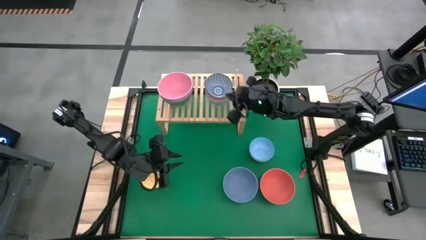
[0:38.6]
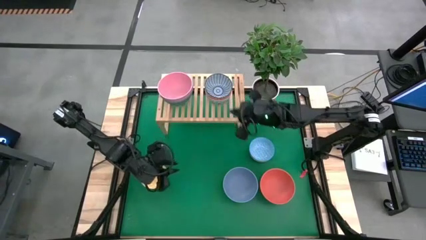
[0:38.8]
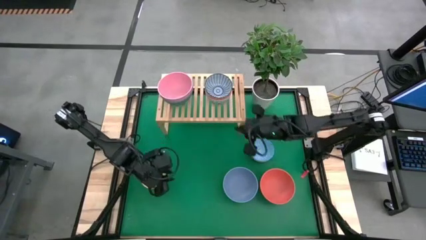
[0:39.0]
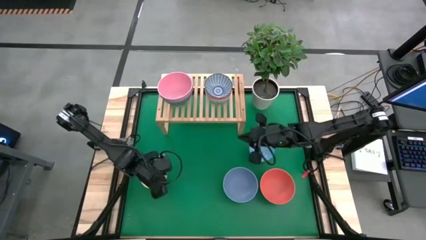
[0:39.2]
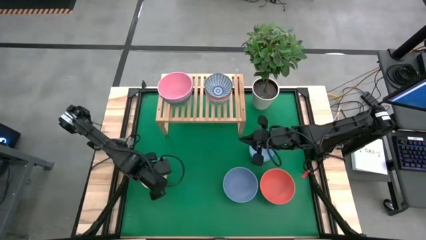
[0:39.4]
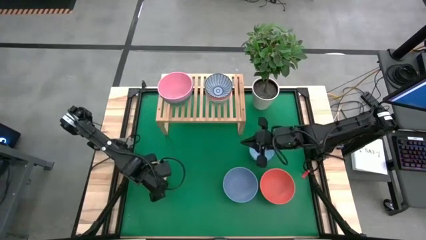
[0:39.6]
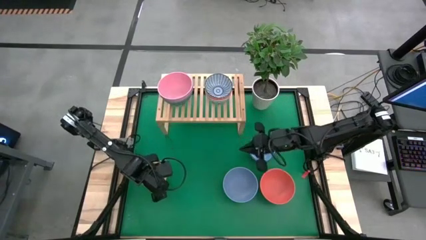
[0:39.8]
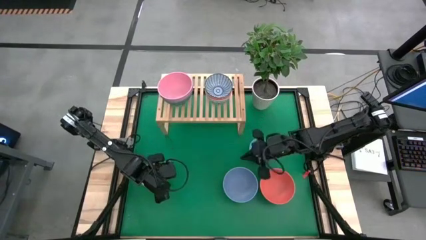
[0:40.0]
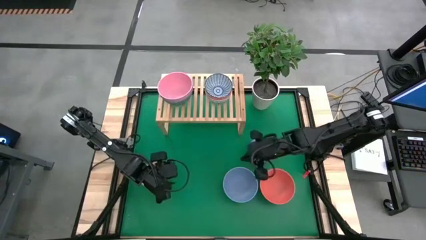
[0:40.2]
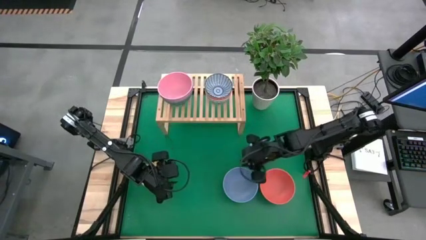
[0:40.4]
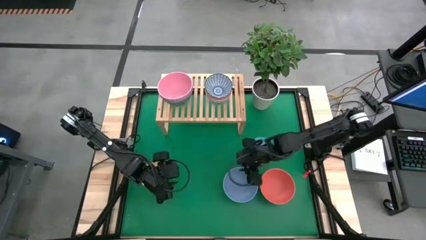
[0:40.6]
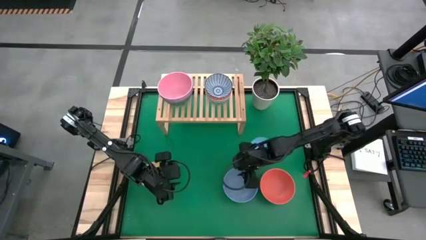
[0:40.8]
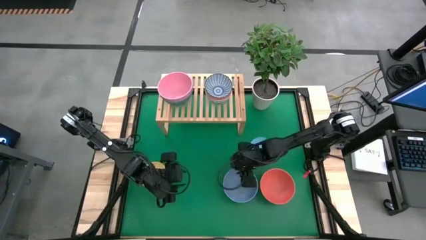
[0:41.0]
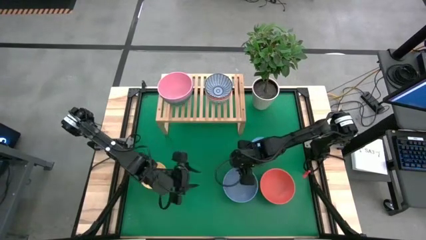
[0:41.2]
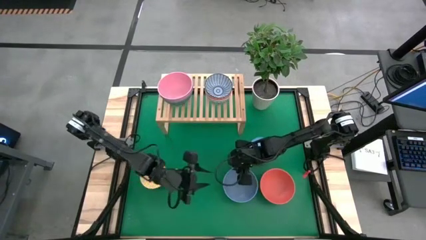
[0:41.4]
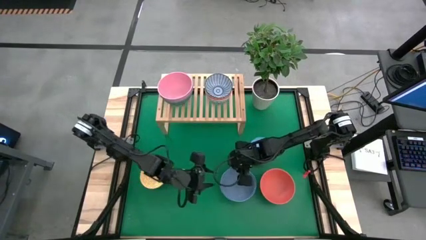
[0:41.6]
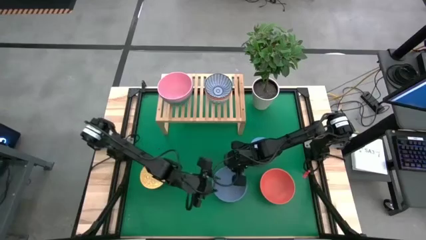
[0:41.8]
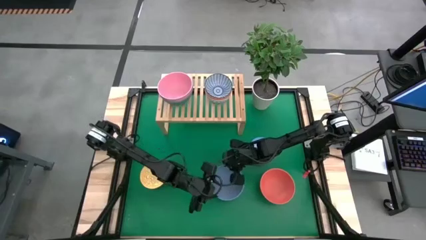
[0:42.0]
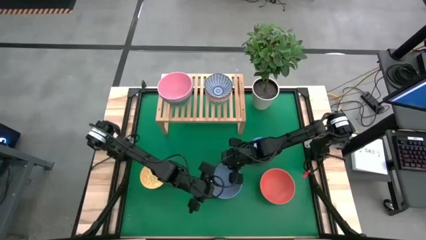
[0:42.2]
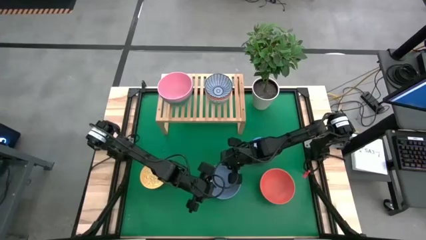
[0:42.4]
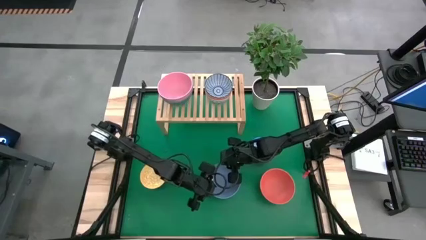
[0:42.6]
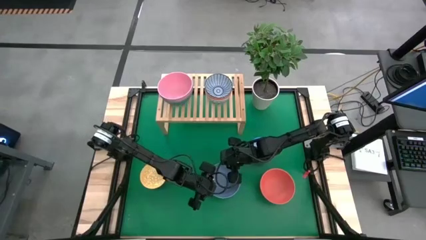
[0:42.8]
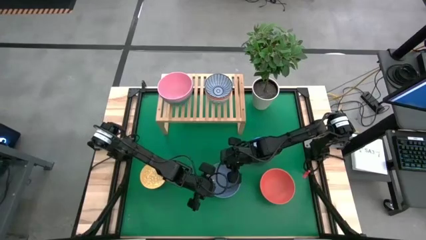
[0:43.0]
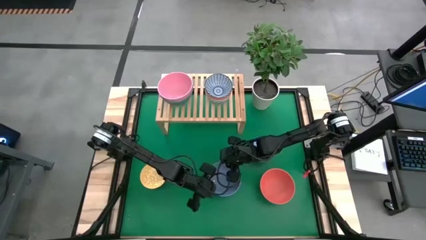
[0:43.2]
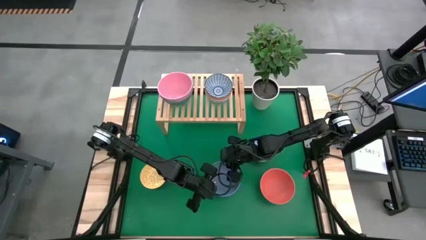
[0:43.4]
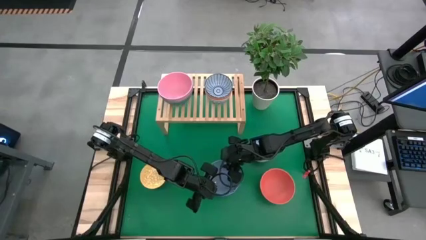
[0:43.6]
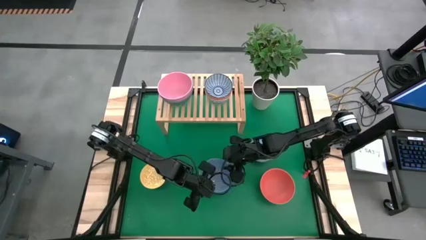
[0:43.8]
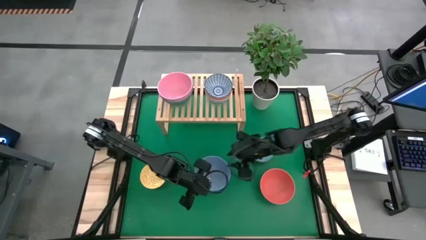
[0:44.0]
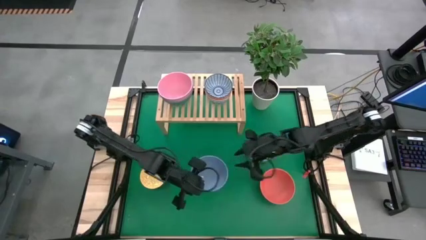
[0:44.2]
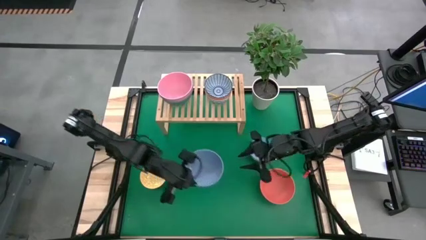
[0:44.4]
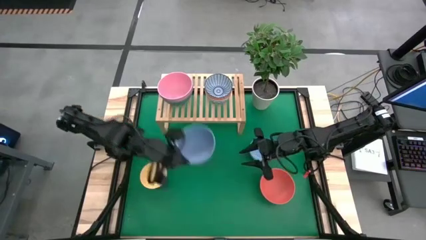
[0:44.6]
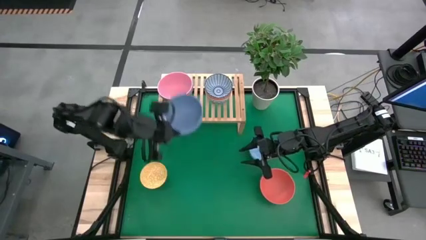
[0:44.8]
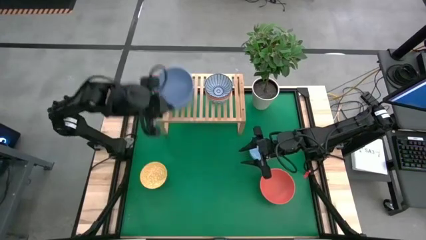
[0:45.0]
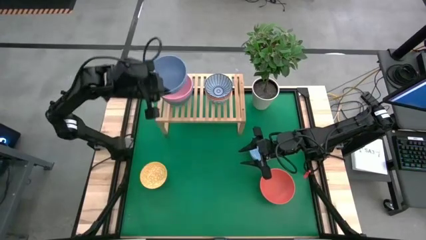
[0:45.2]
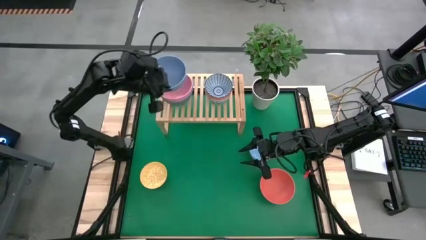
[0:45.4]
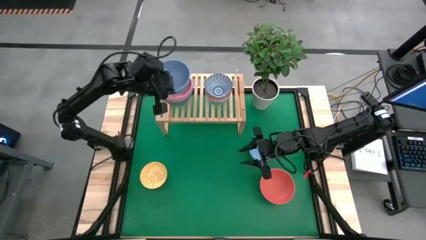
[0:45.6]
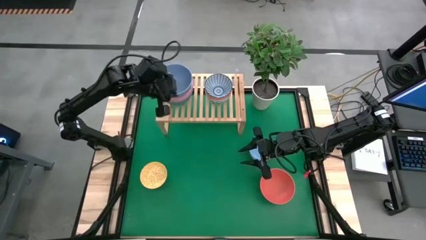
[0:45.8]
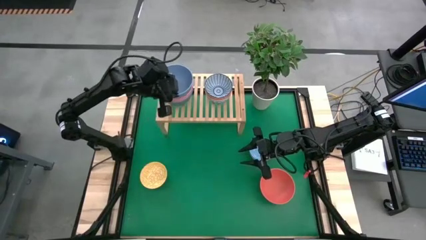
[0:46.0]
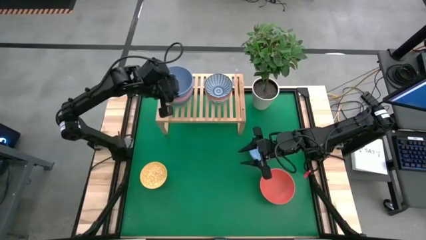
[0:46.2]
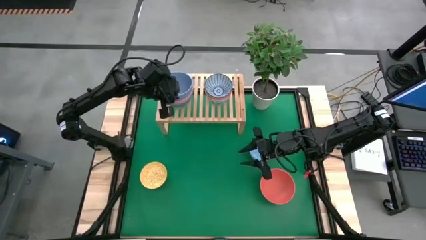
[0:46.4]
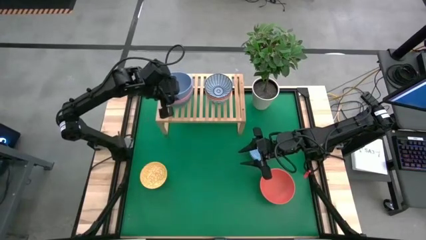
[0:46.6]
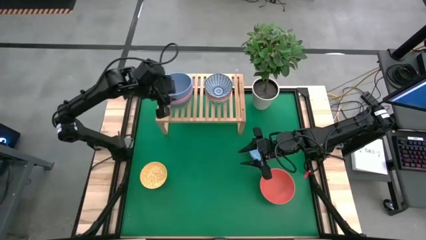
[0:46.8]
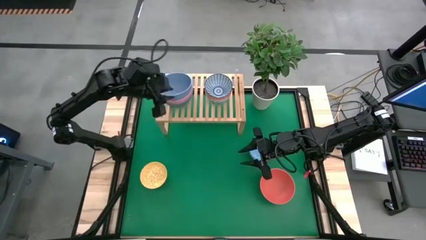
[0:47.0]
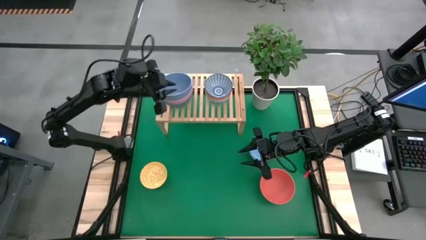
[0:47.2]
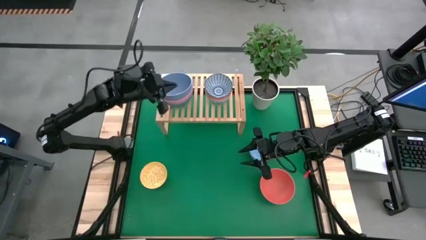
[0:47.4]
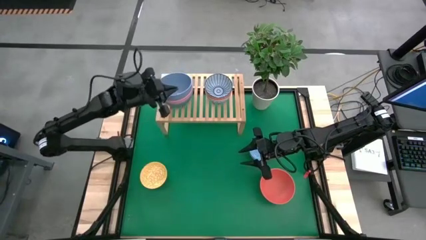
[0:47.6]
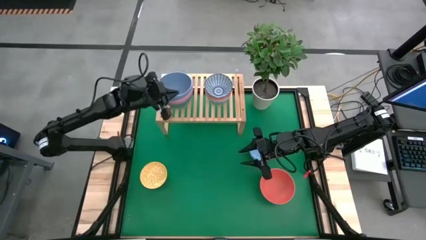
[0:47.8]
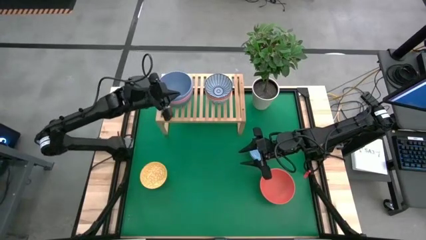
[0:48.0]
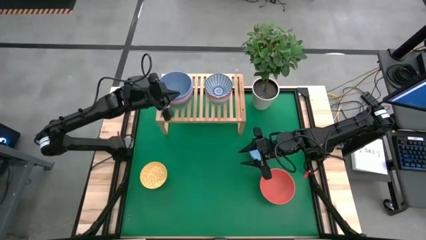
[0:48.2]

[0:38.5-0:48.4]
Task: Place and stack bowls onto a shelf
Stack the large blue bowl on the large pink bowl

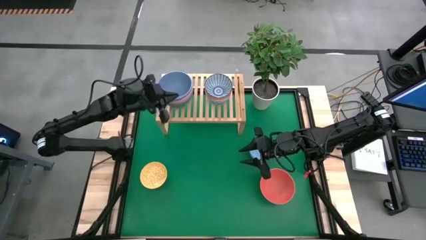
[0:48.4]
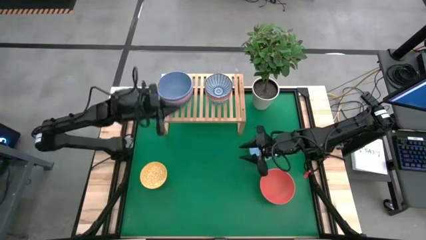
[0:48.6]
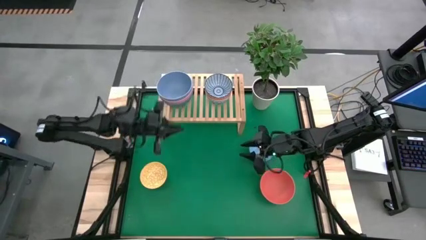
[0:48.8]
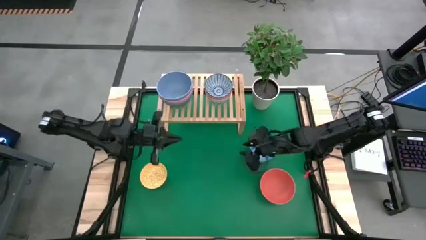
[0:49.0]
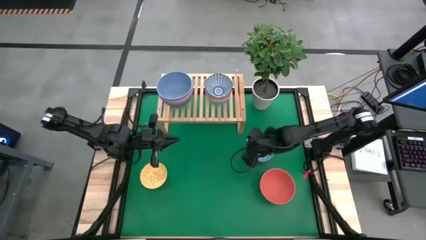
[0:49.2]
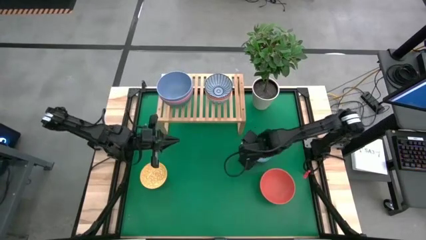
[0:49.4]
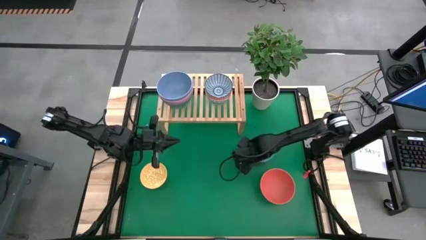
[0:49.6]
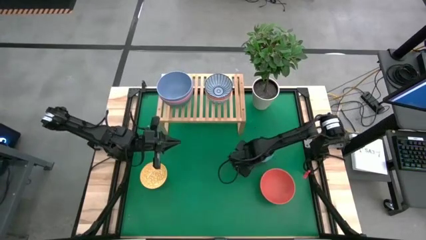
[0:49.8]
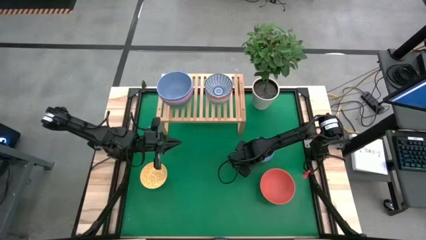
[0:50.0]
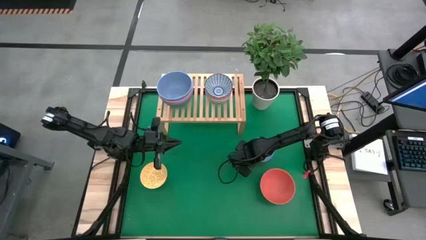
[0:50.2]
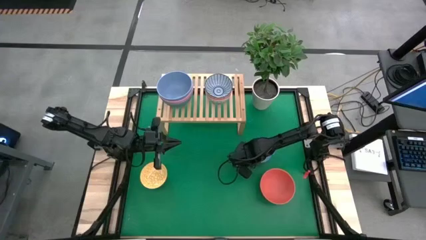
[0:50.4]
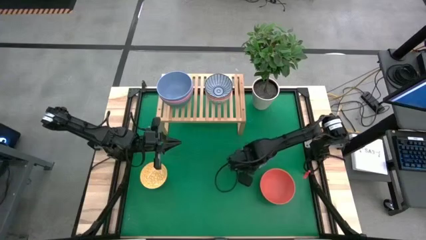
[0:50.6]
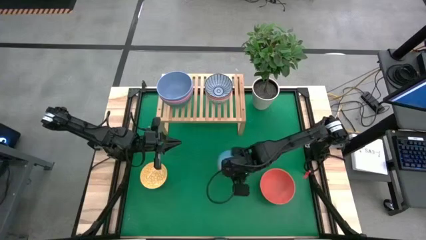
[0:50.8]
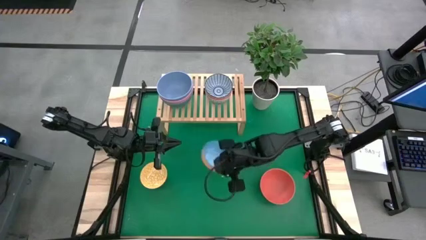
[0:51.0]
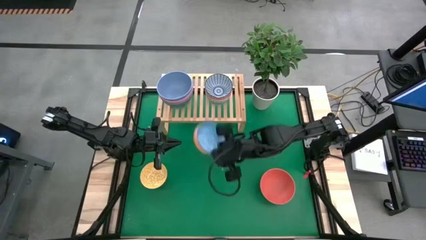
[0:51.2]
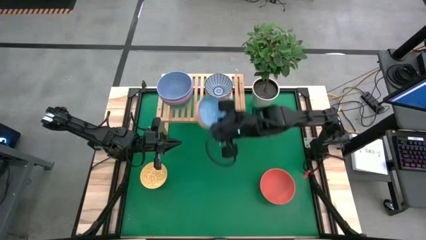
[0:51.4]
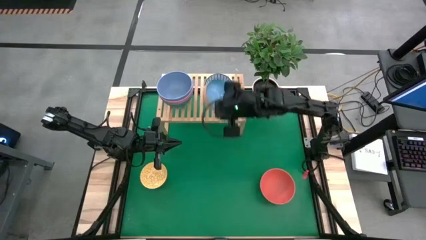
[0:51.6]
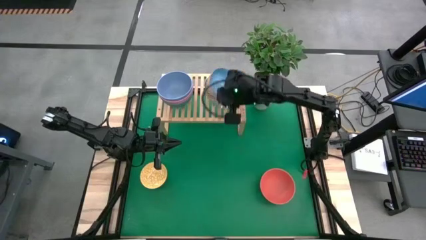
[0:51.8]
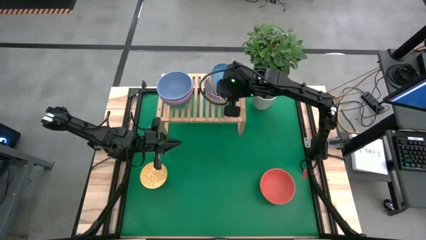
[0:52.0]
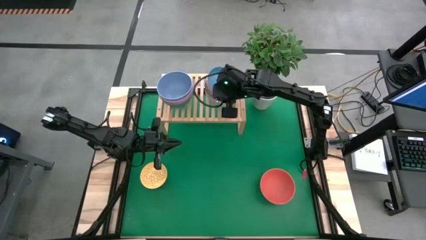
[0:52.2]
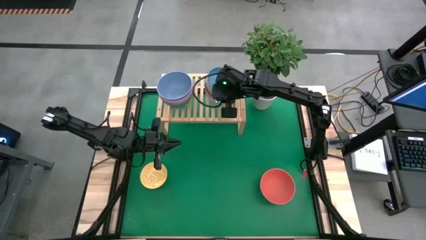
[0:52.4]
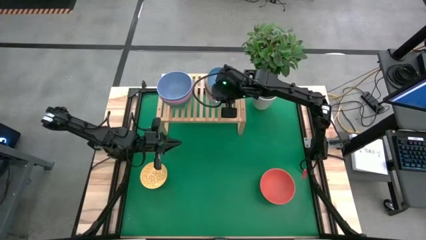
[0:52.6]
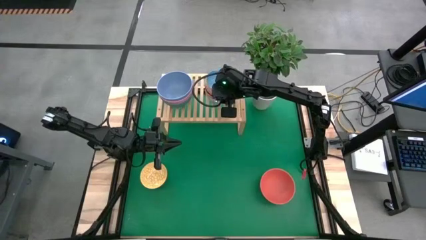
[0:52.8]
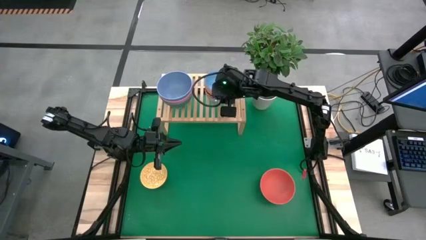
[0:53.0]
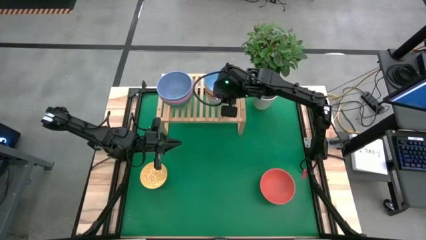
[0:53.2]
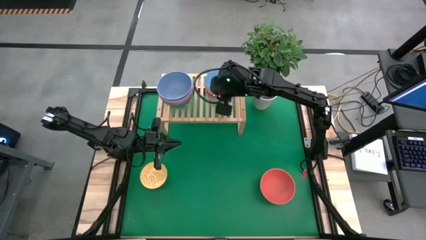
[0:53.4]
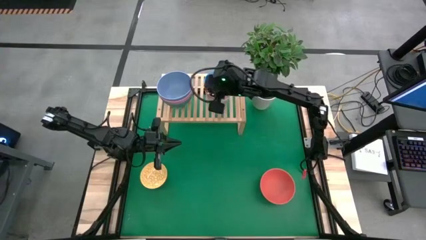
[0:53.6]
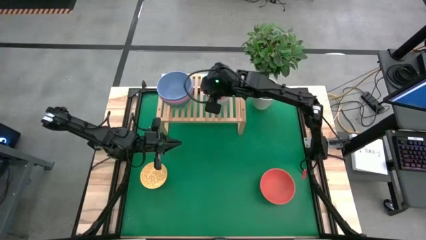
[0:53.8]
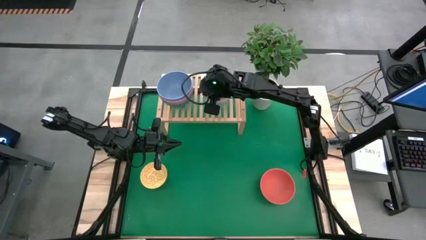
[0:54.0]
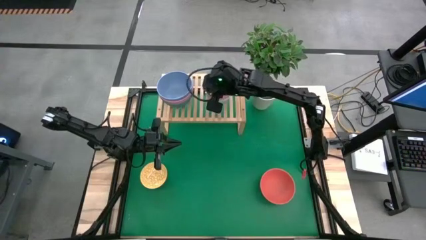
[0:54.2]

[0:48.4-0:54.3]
Stack the small light blue bowl on the small blue pattern bowl
